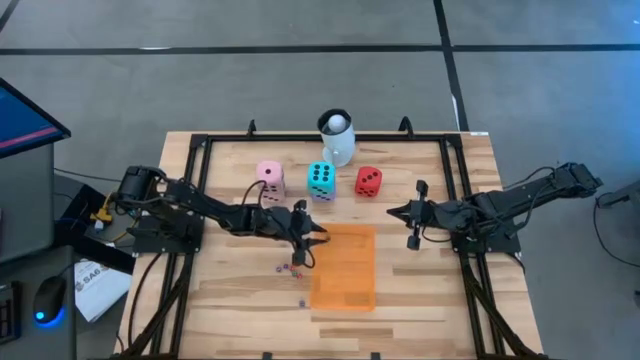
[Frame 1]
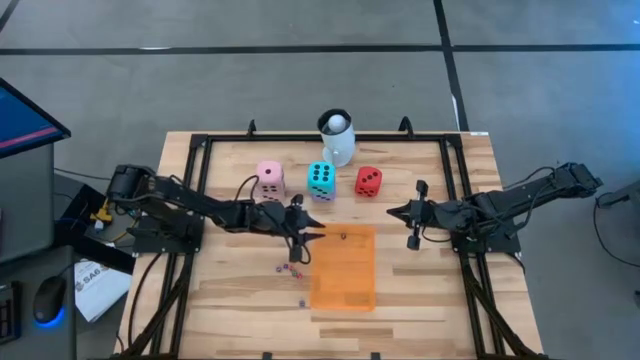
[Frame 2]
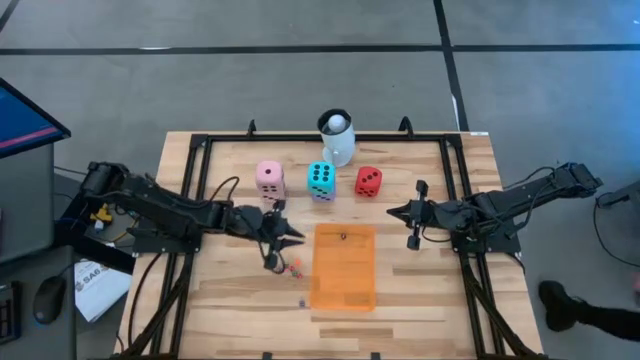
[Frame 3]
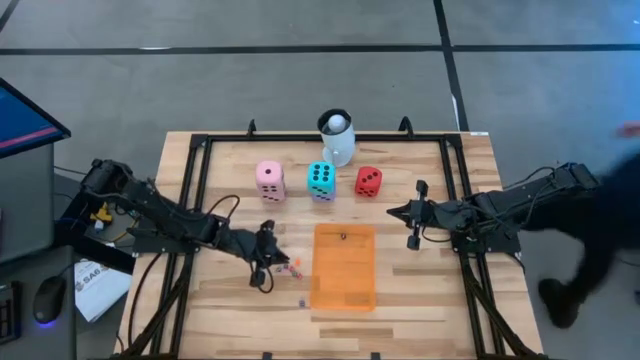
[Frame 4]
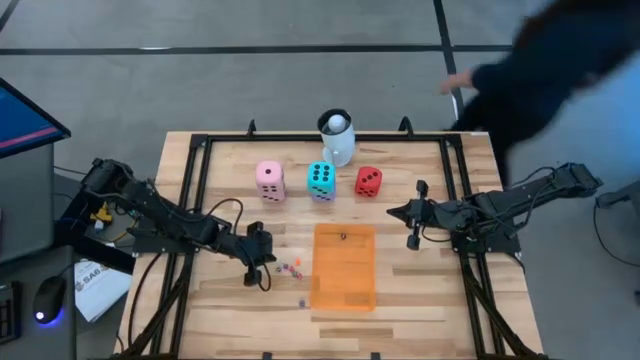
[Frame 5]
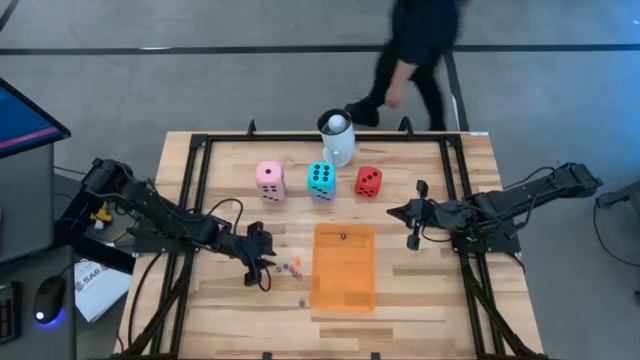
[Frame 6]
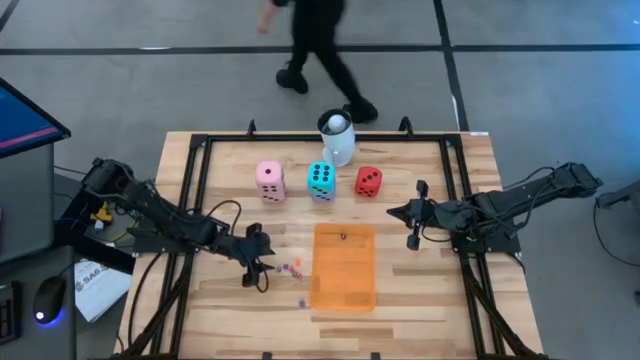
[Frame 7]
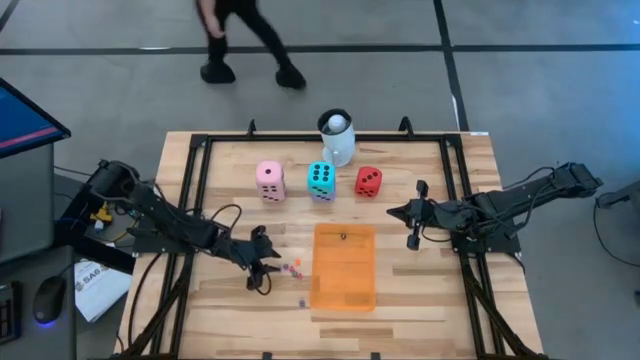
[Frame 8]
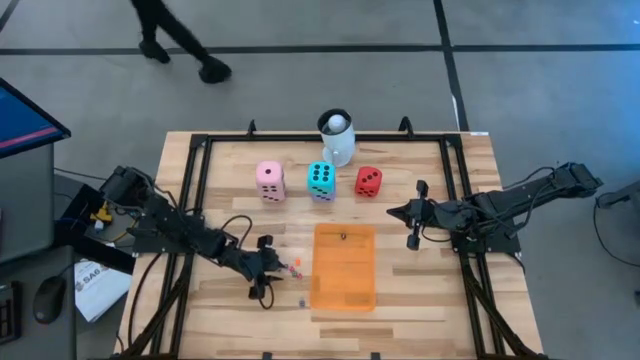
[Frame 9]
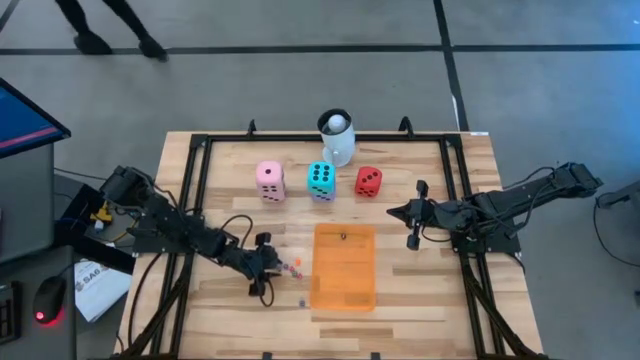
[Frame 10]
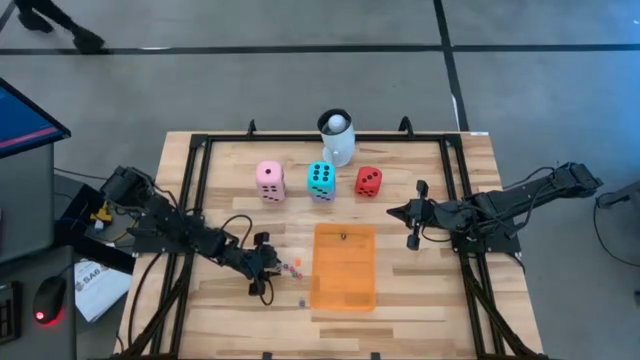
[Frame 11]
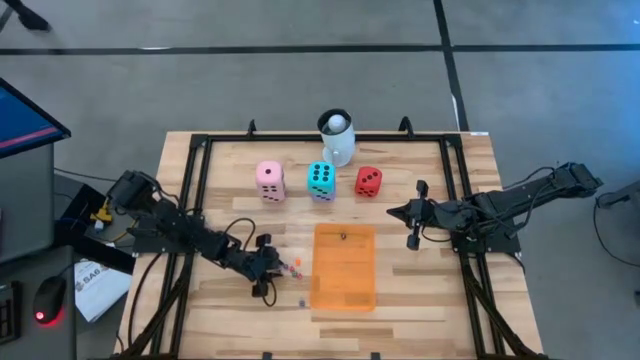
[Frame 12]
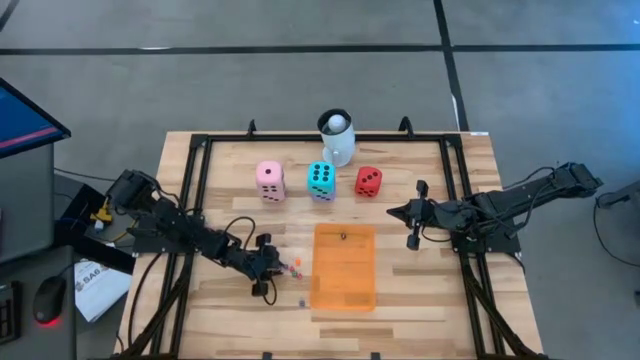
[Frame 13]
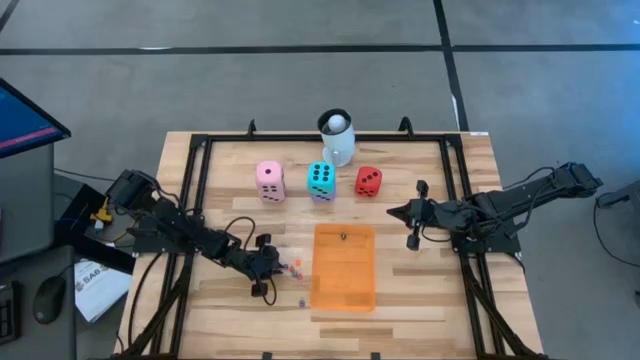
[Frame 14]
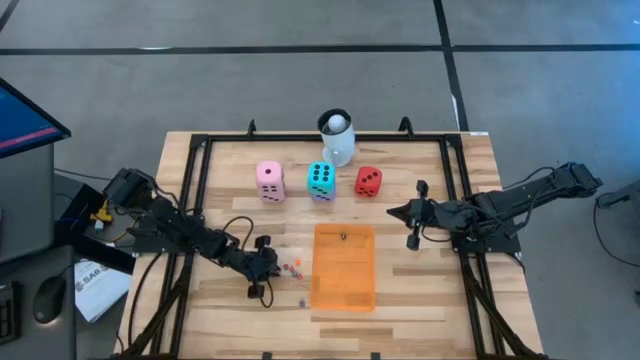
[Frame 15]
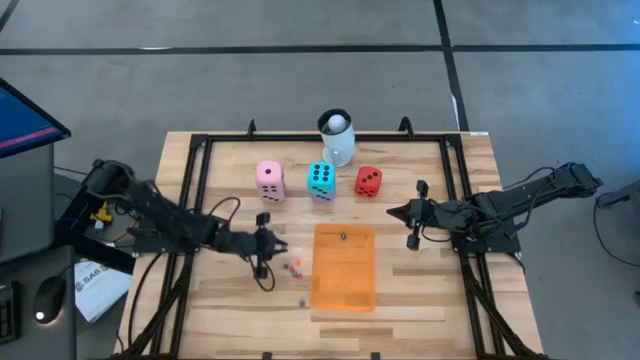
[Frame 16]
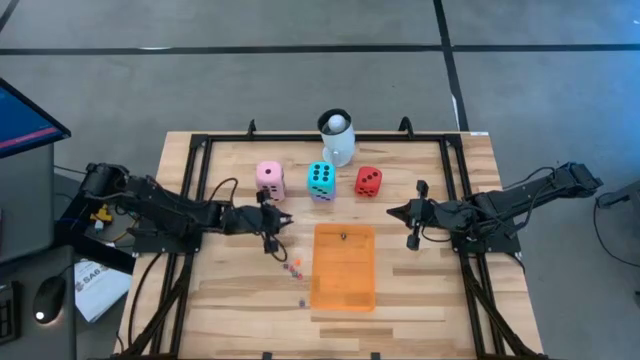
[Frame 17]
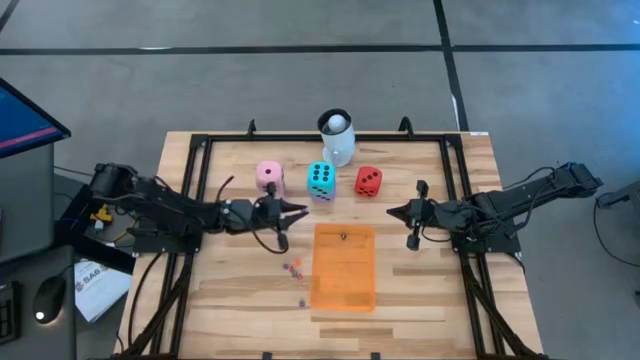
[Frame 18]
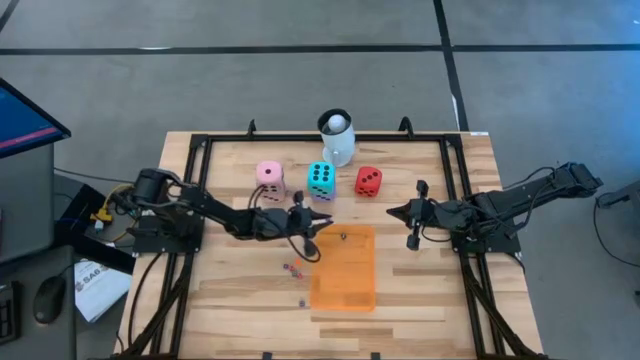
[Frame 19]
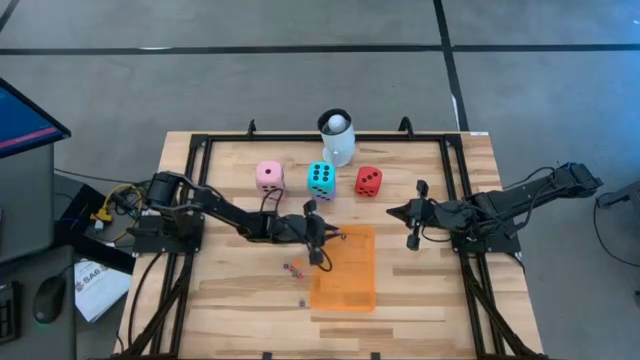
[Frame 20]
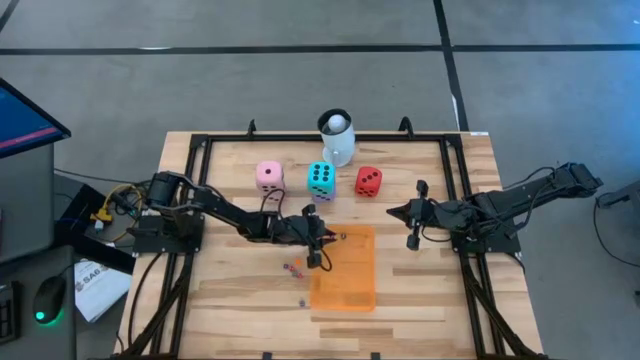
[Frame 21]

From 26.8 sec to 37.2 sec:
Task: Pick & Place Dice
Put the left small purple dice into the orange bin

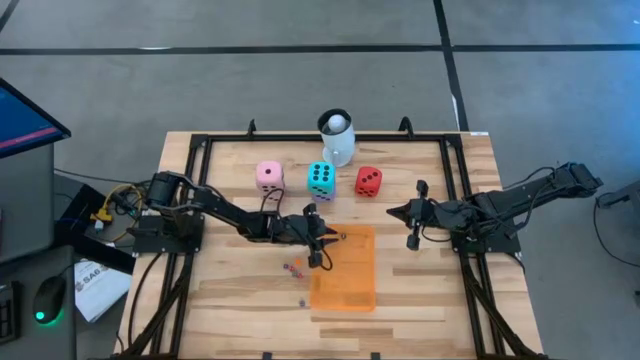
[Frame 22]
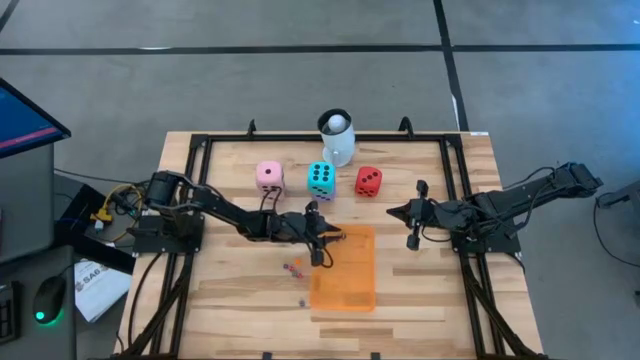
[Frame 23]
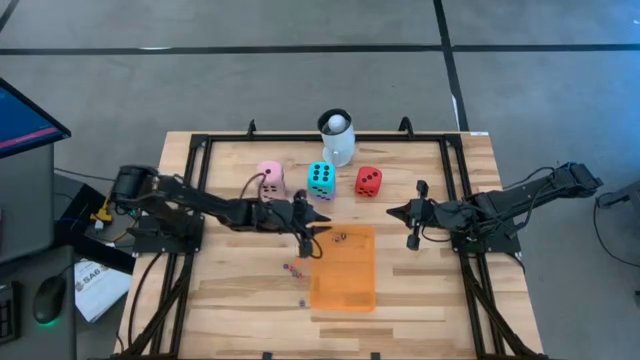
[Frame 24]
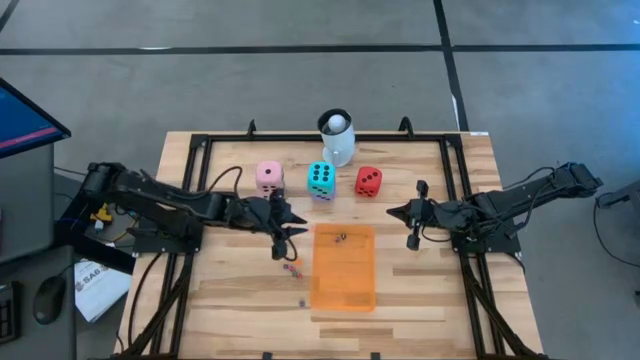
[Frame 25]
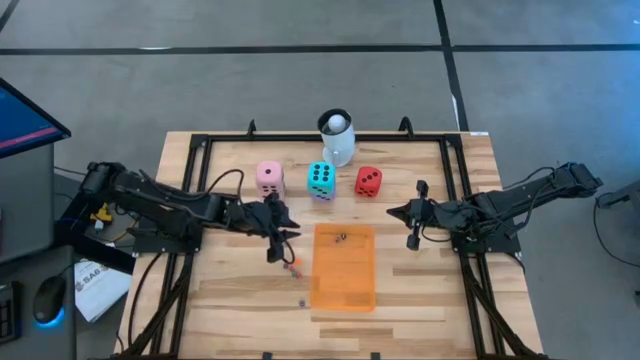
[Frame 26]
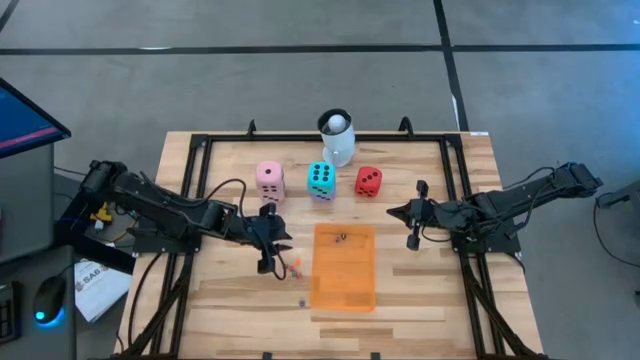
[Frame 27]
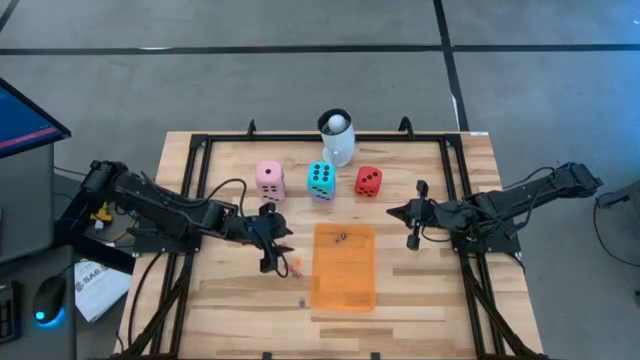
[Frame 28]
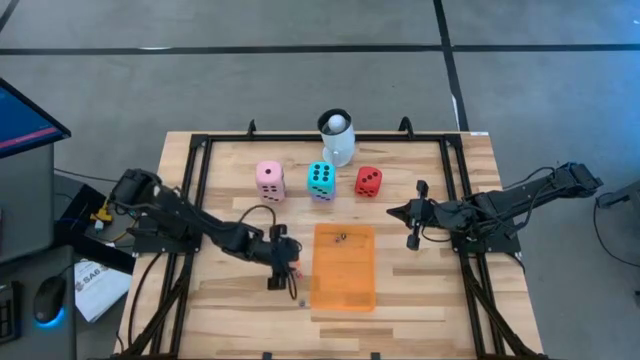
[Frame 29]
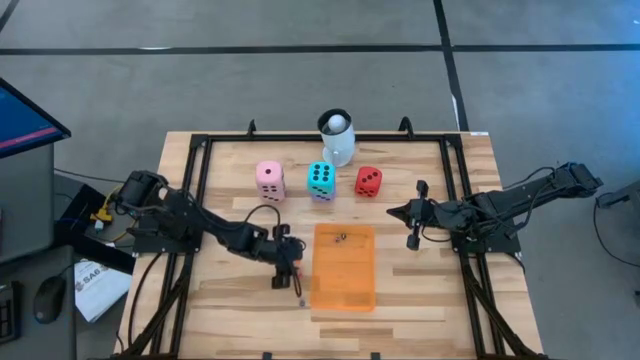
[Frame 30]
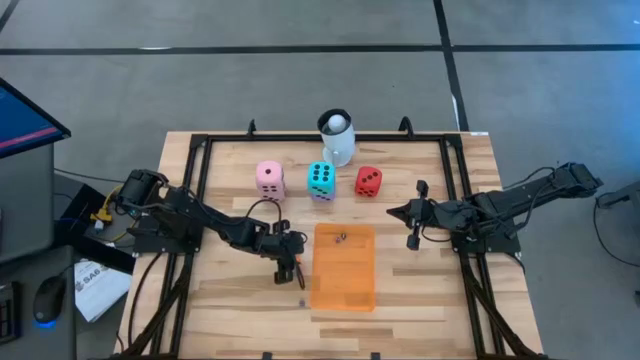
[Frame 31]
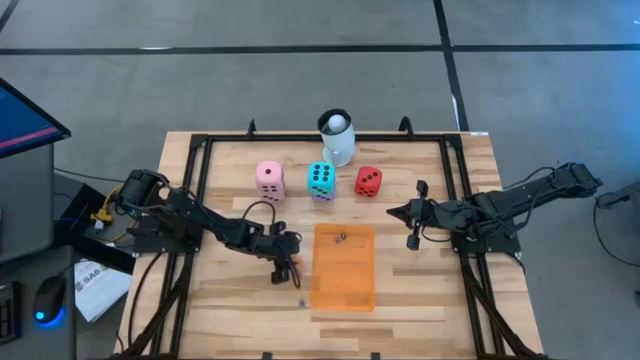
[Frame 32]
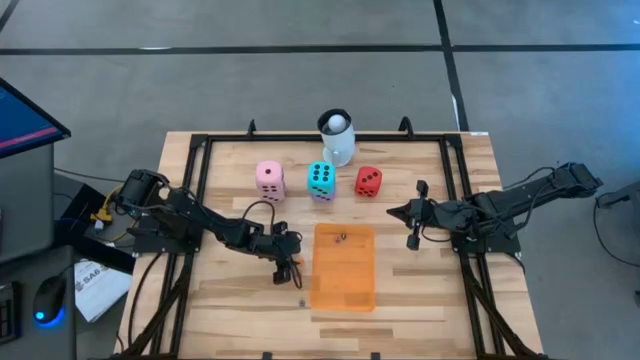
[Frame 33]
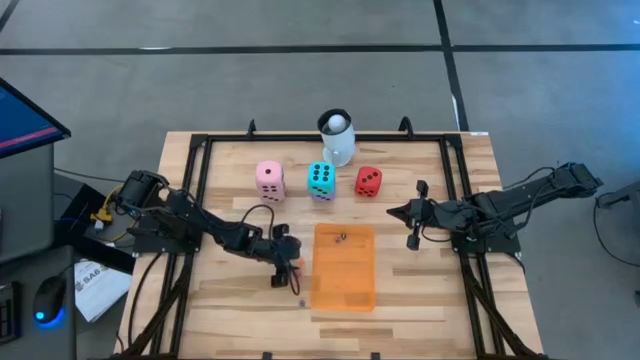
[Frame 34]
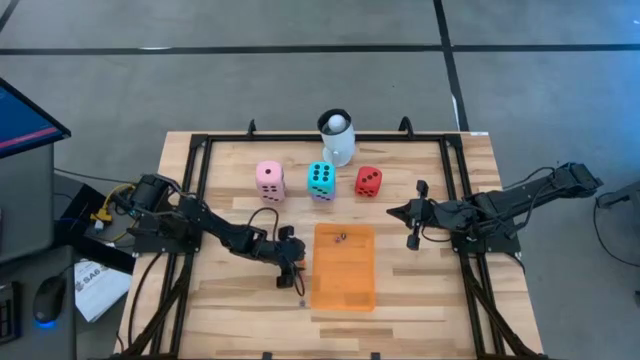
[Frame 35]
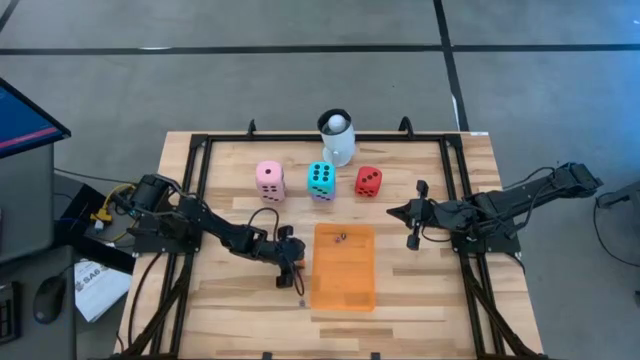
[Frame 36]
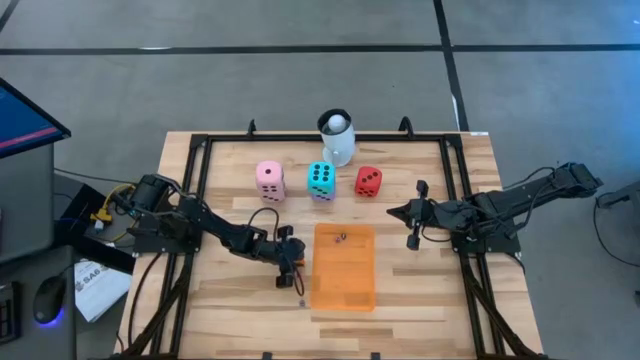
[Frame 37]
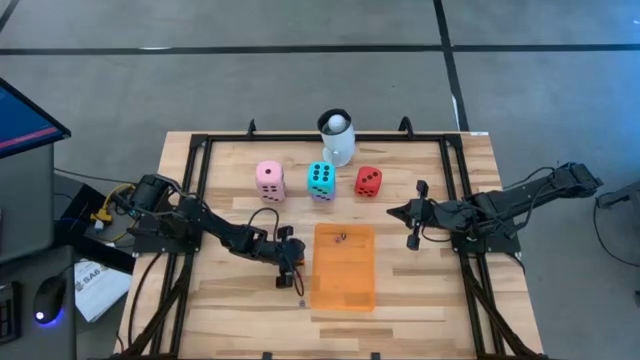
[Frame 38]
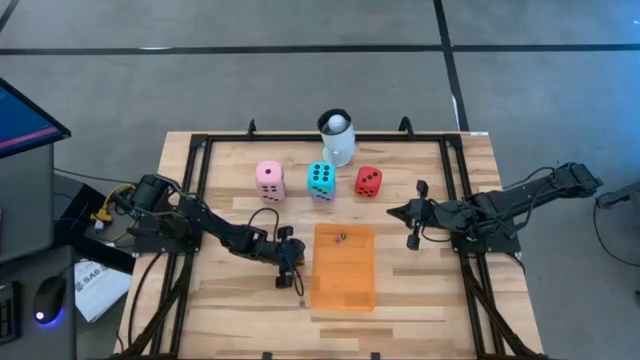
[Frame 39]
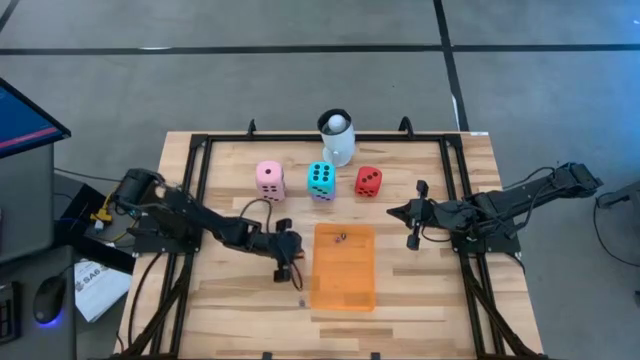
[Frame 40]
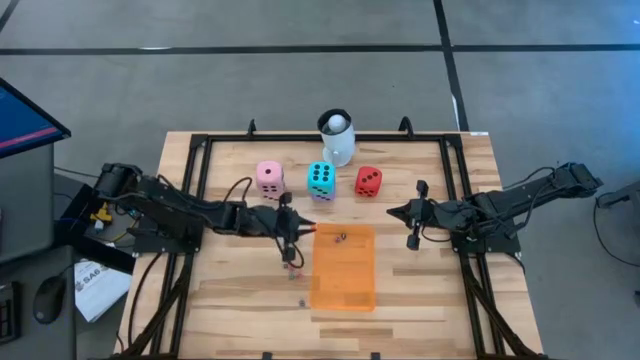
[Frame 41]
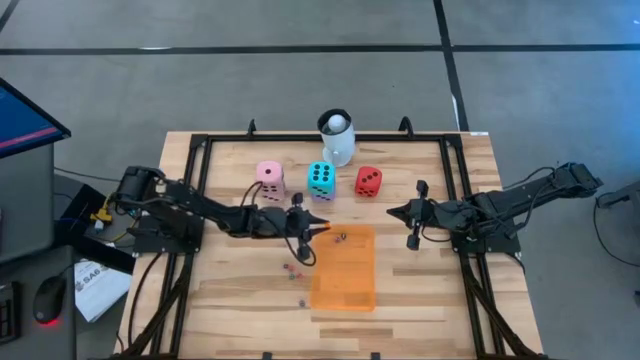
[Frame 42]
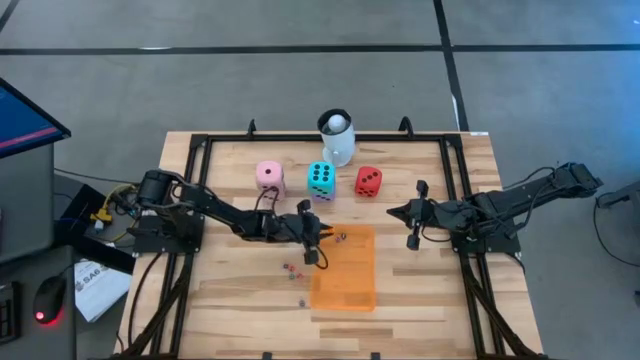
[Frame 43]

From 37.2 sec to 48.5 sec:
Put the small orange dice into the orange bin
